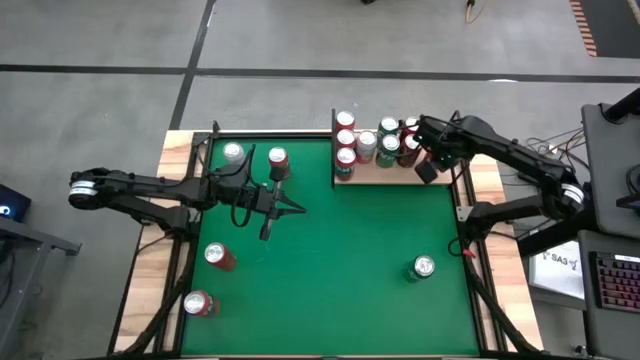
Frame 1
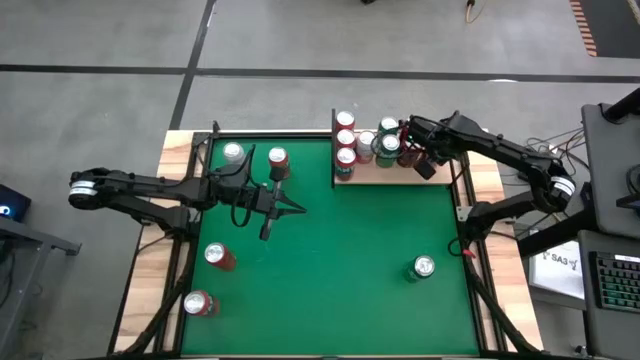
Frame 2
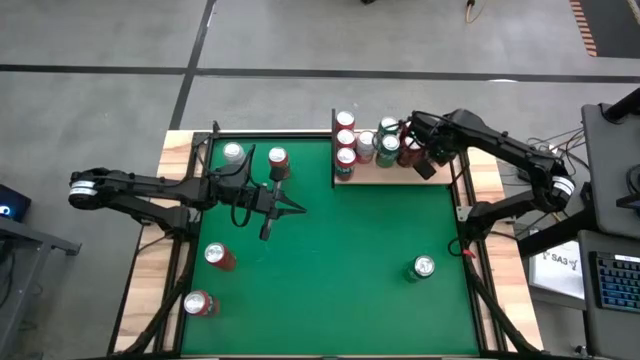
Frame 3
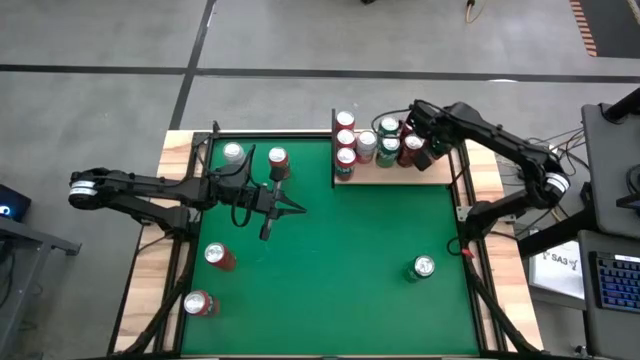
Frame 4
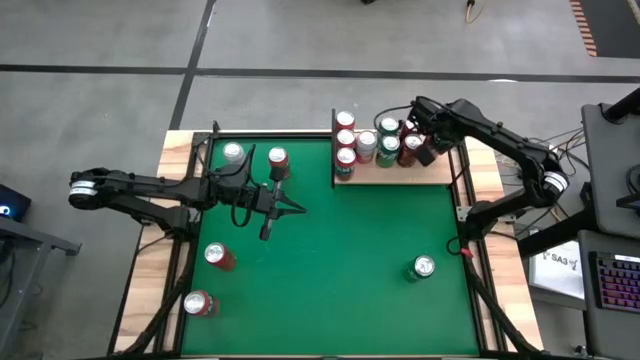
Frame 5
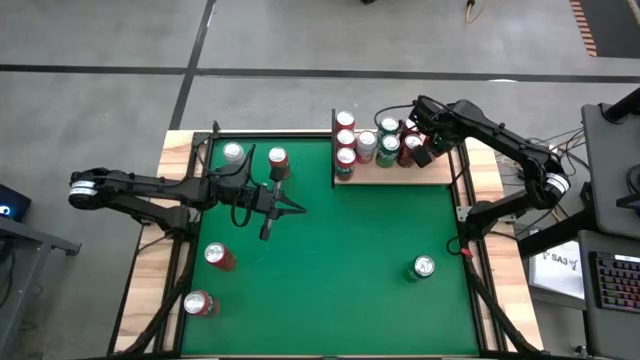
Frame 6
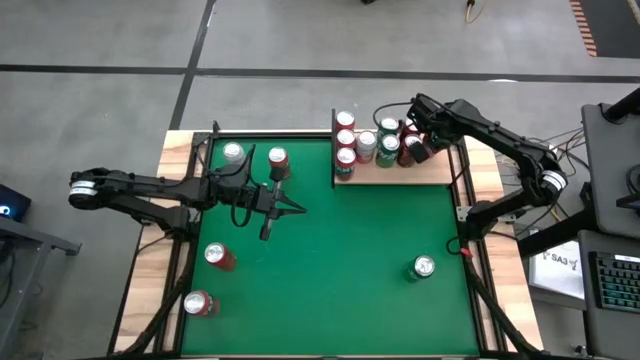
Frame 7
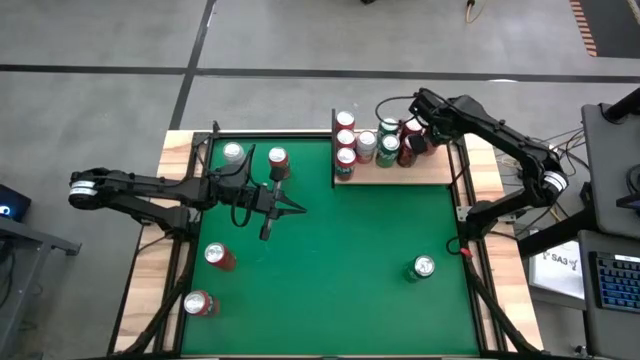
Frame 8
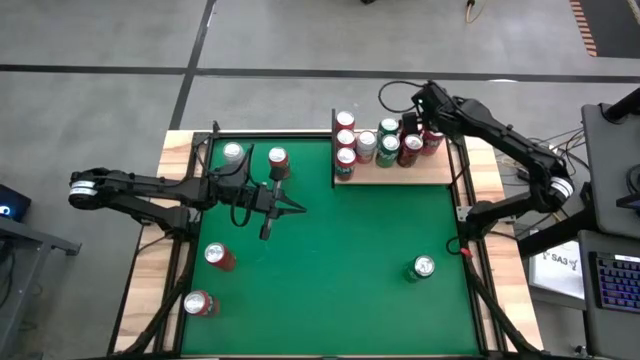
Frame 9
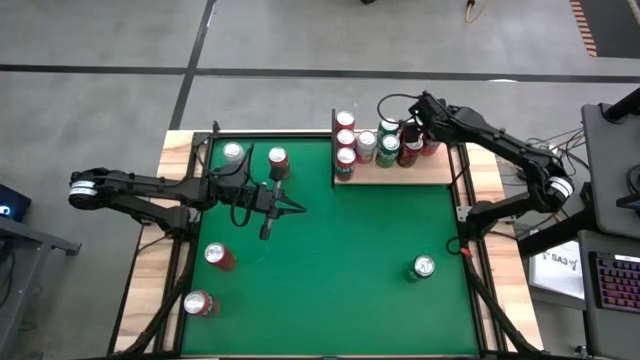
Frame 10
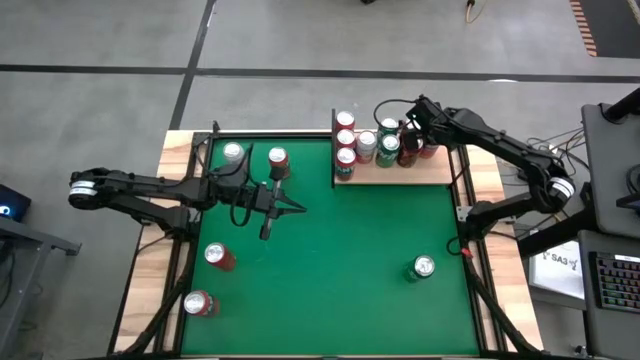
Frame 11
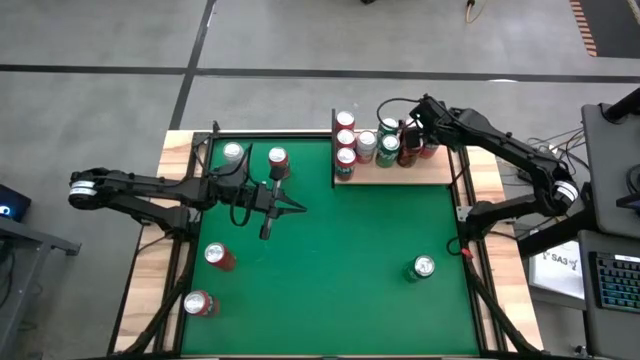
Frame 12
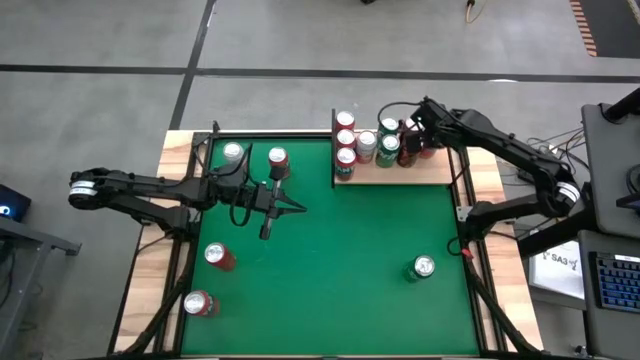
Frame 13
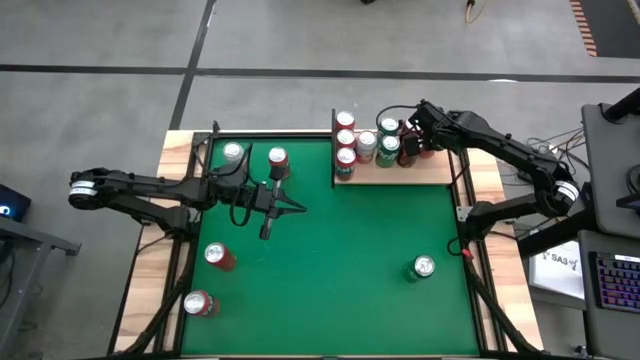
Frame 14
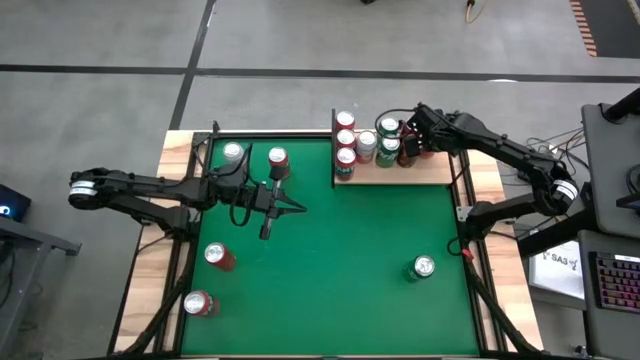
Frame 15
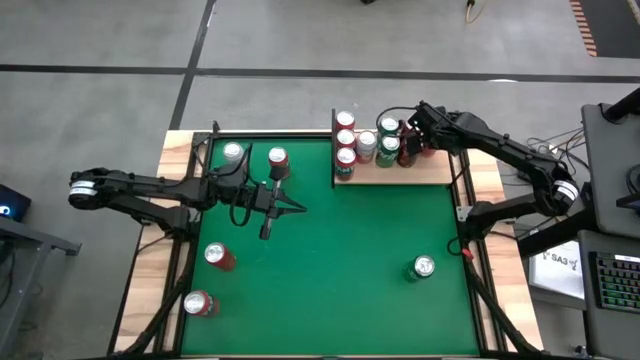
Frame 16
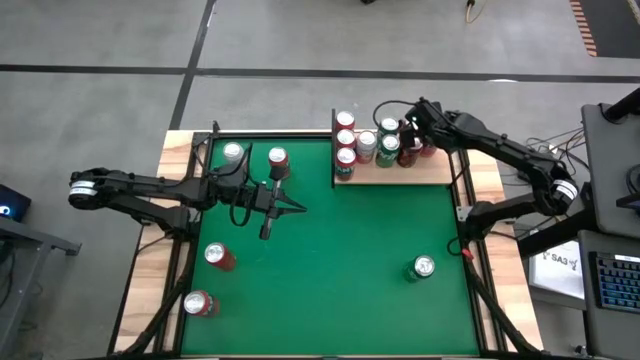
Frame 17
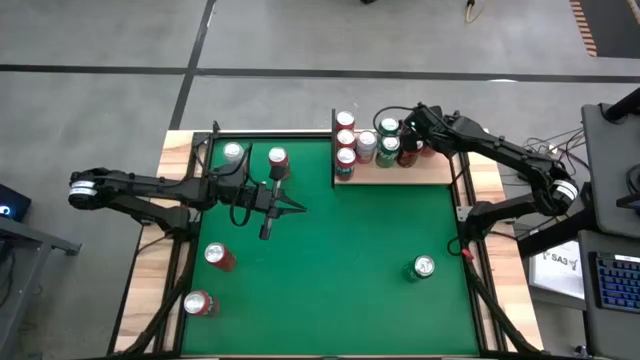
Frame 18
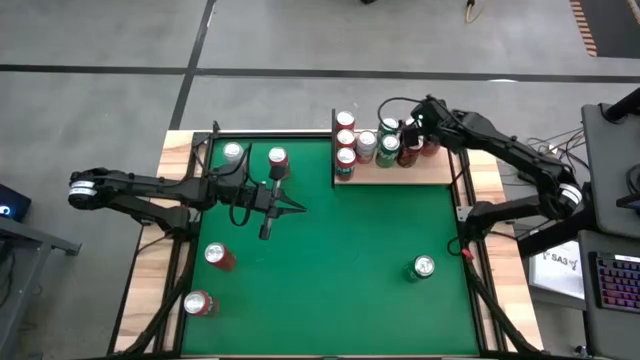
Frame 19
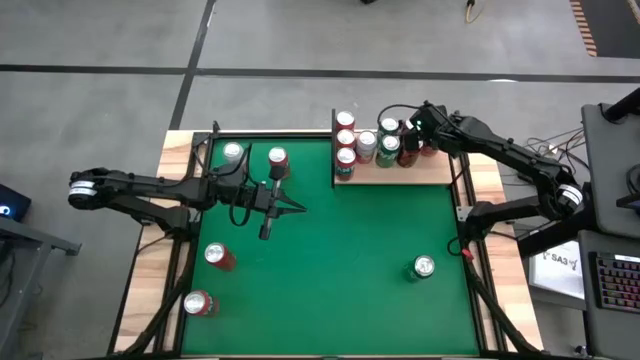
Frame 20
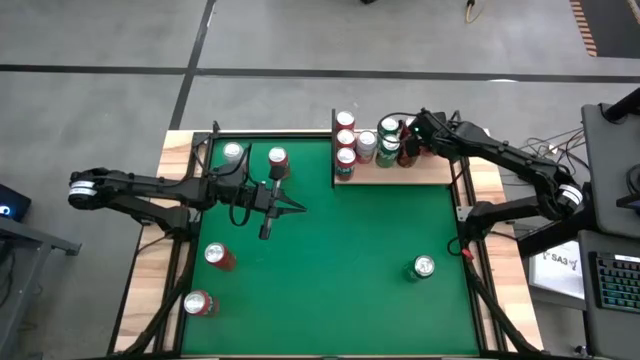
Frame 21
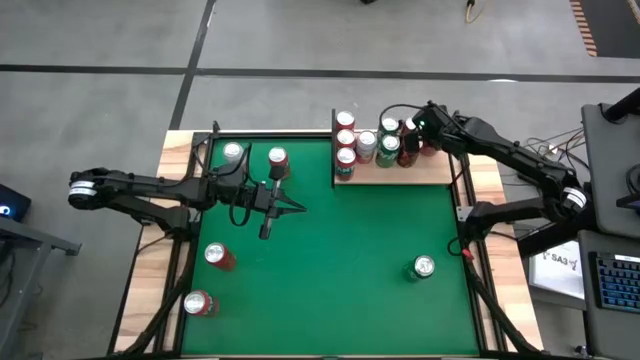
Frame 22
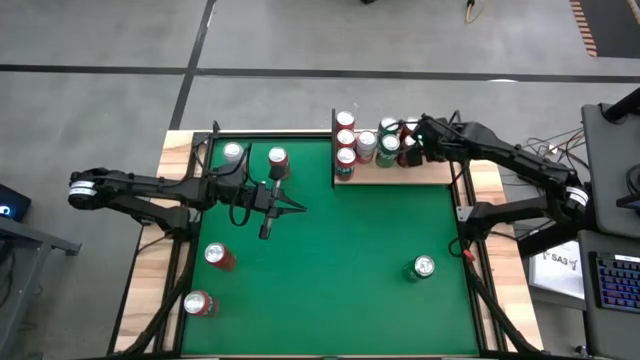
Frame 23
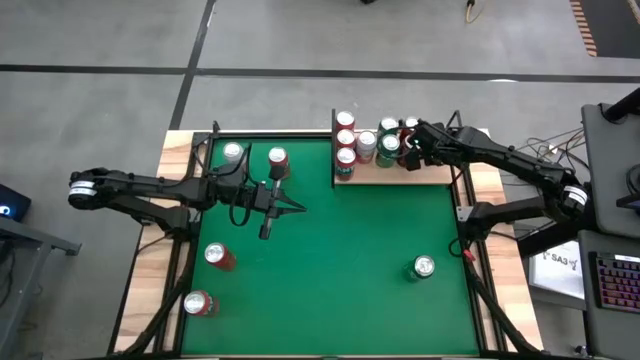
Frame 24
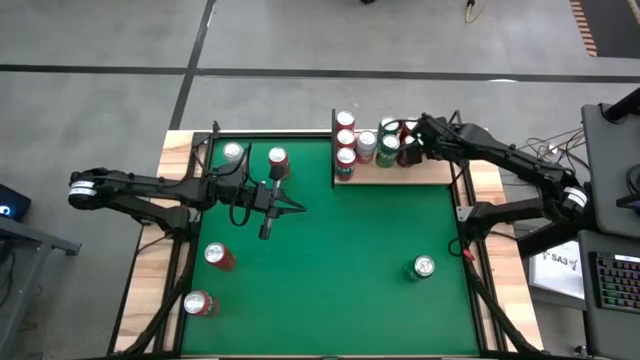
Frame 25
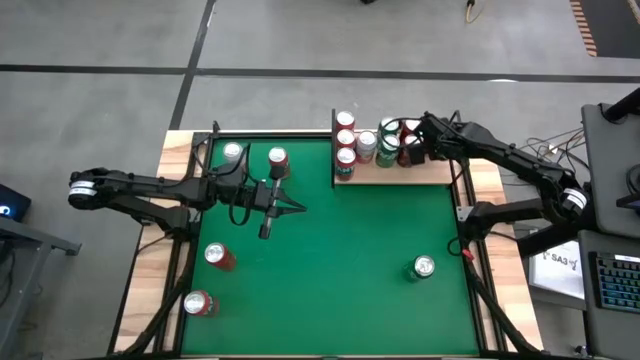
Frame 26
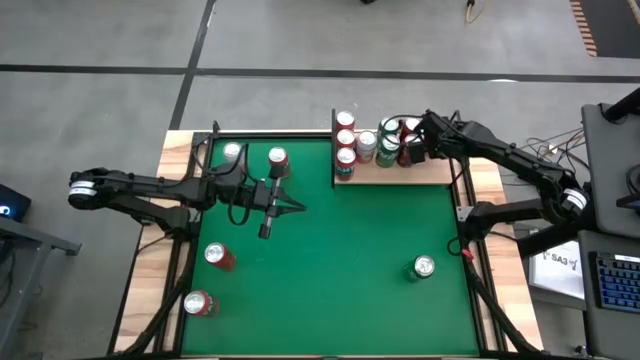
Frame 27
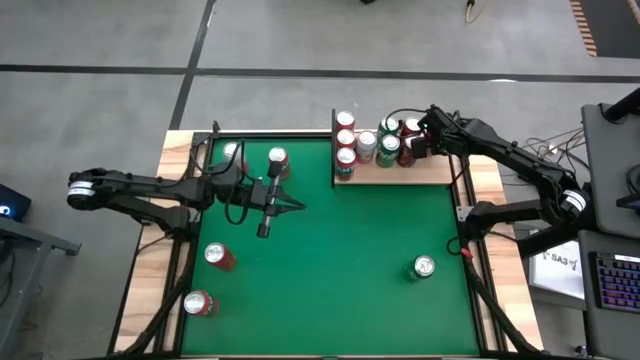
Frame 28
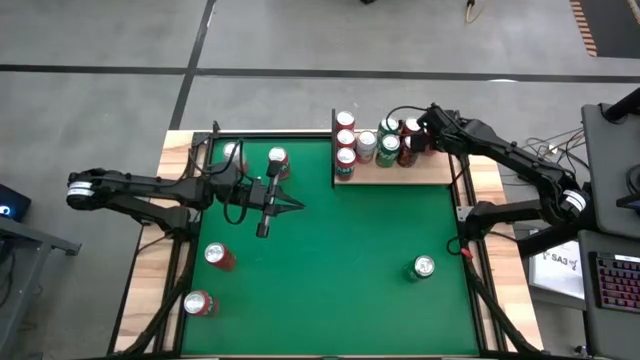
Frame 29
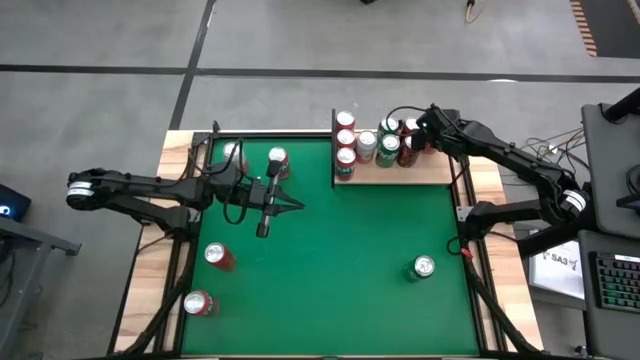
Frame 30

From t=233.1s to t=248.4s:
Task: Place canned beverage on shelf
Put the red soda can on the shelf

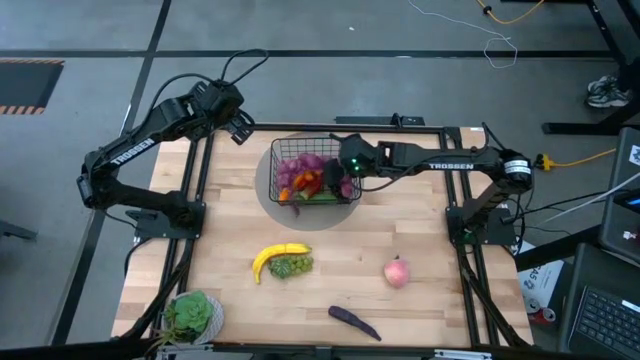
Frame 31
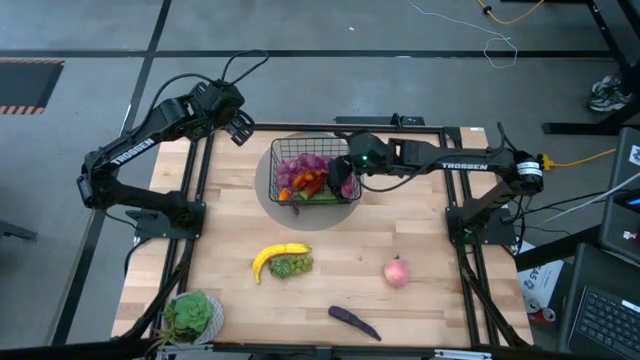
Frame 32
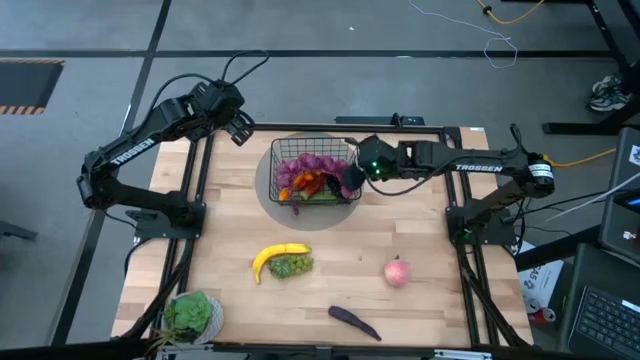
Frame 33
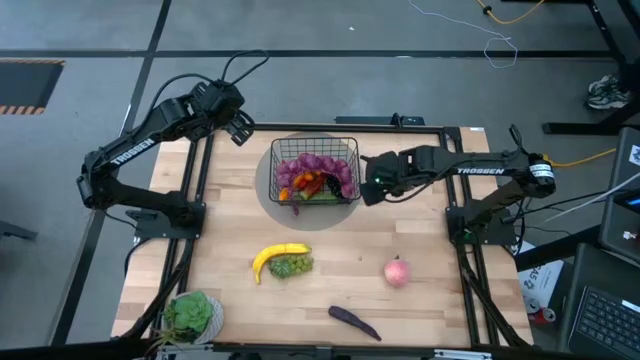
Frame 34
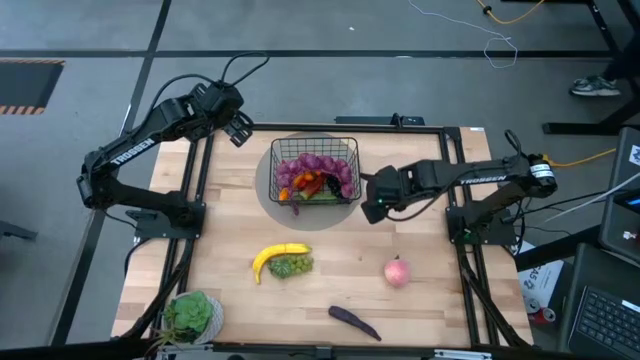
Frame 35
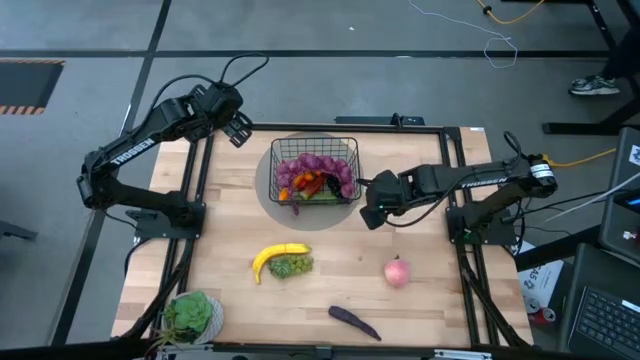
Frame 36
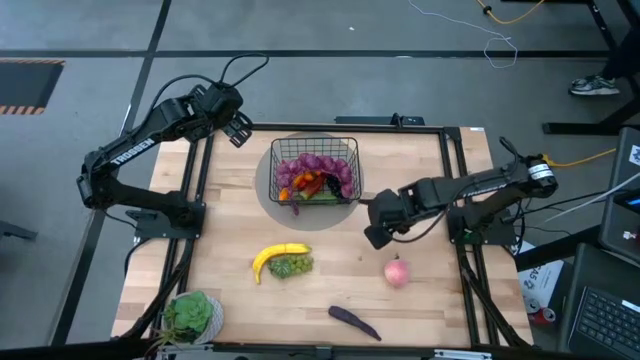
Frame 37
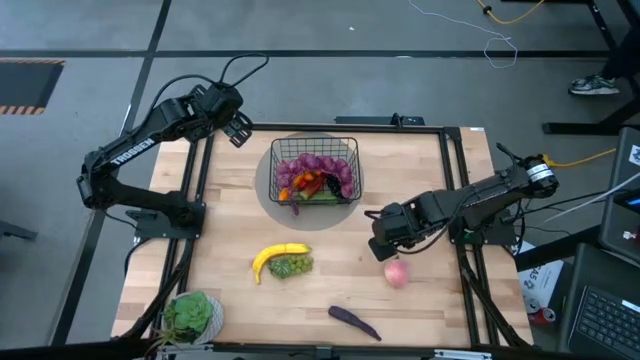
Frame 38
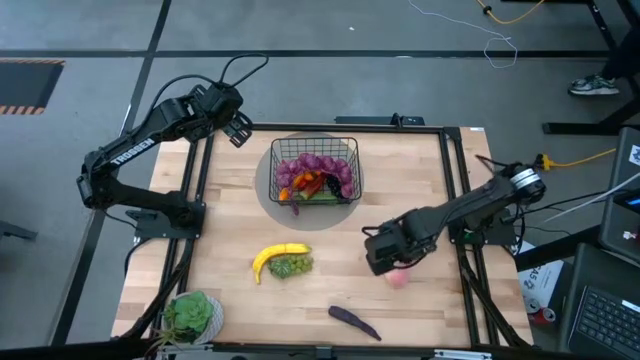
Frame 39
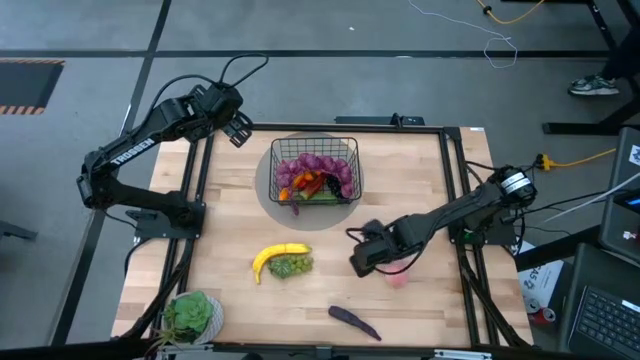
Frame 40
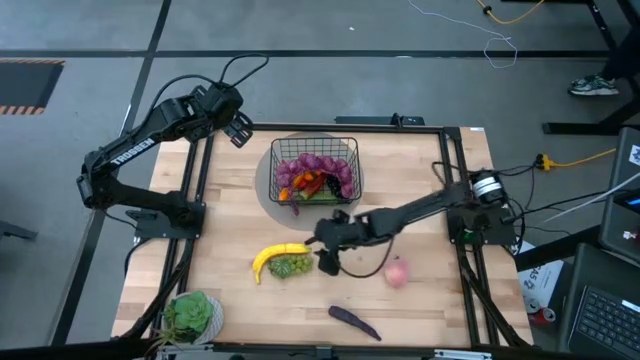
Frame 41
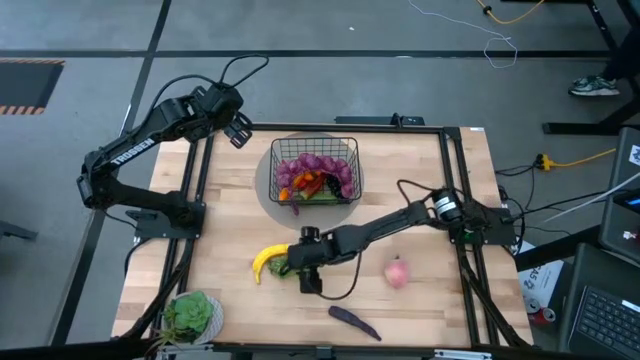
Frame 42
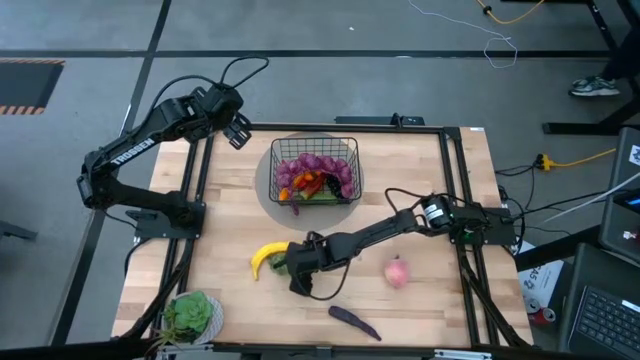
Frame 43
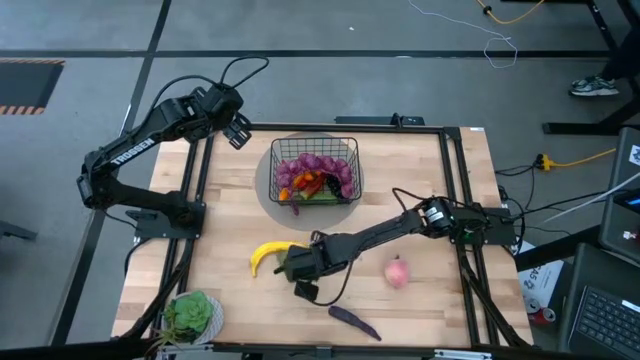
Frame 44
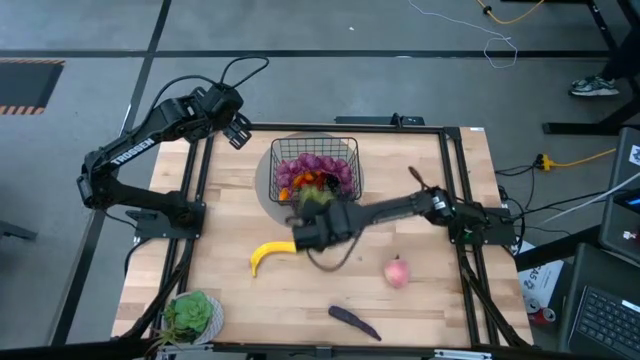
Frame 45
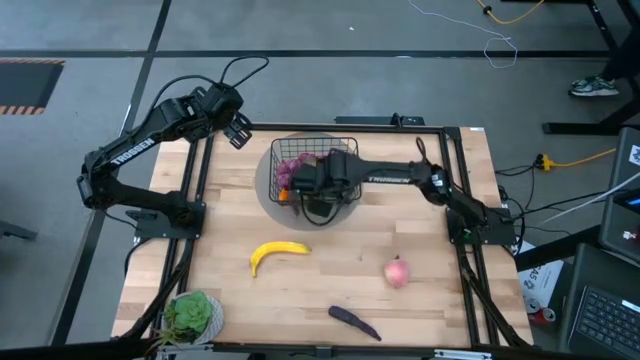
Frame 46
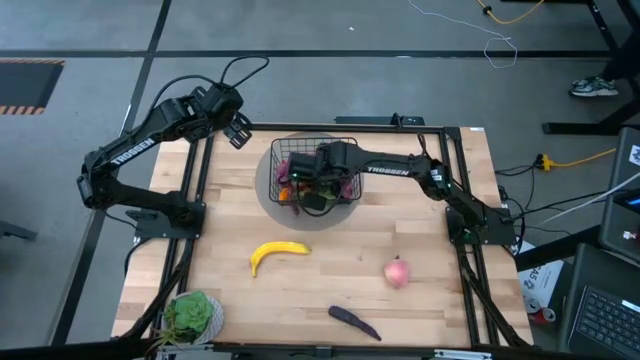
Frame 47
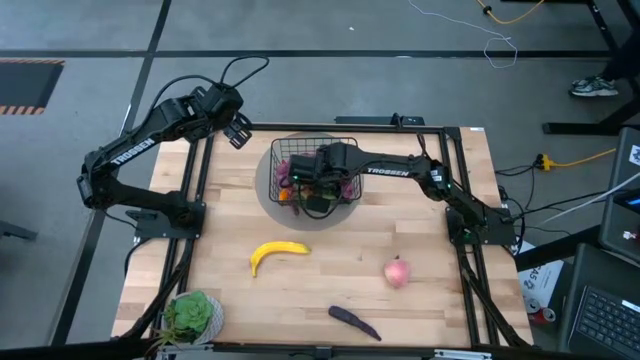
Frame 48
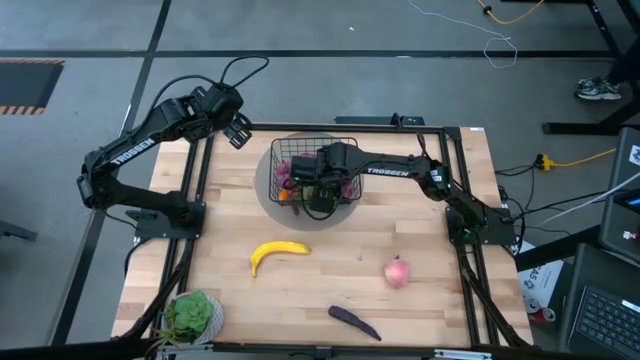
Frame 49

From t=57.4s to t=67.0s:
Task: Build produce basket
Put the green grapes into the wire basket
